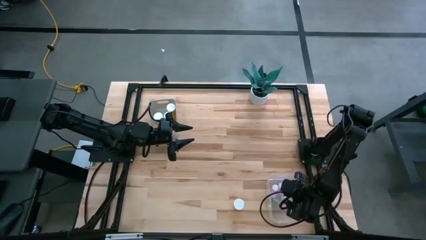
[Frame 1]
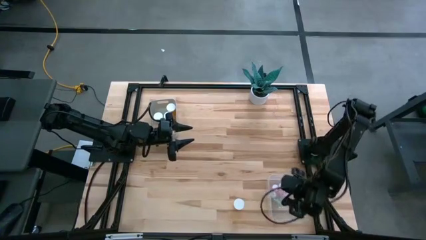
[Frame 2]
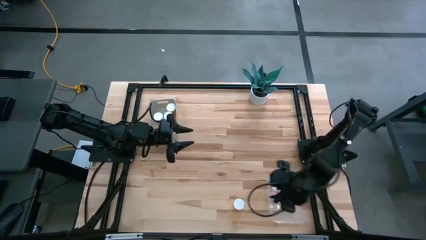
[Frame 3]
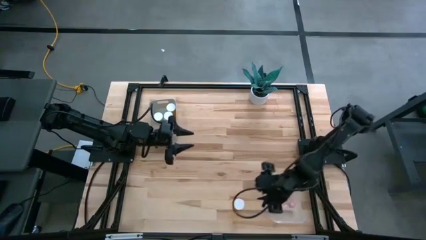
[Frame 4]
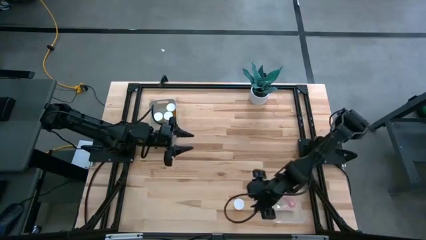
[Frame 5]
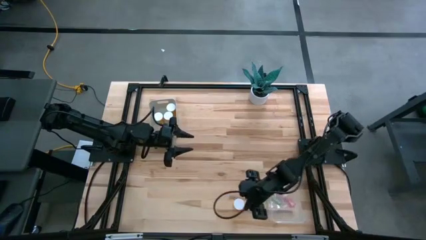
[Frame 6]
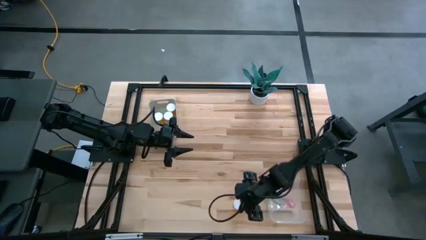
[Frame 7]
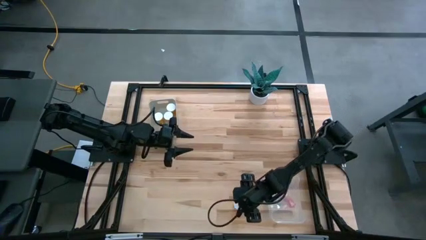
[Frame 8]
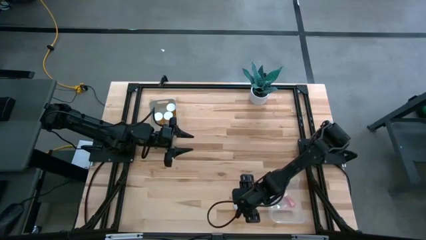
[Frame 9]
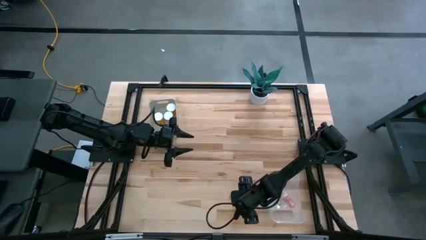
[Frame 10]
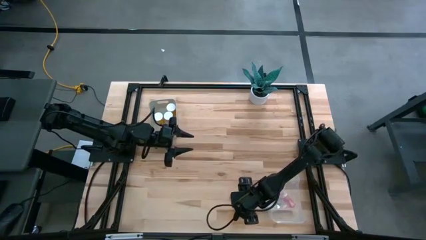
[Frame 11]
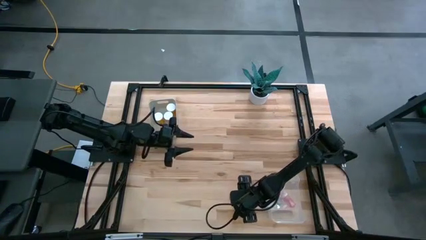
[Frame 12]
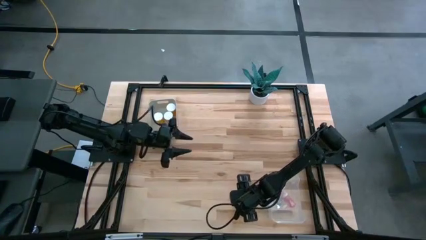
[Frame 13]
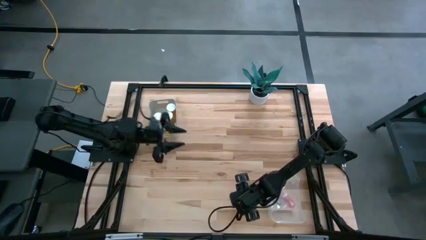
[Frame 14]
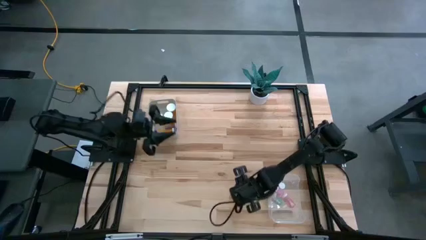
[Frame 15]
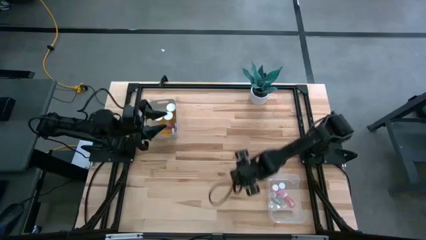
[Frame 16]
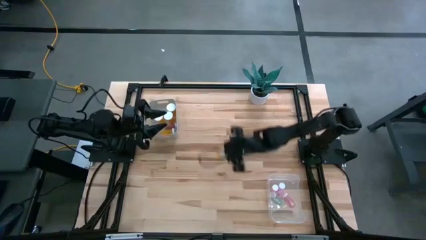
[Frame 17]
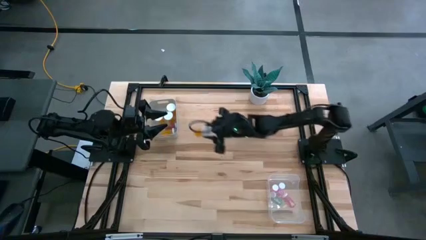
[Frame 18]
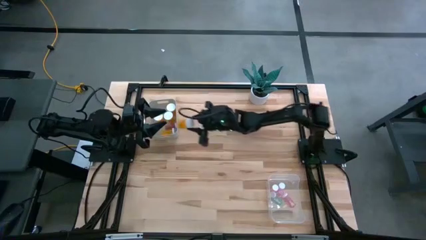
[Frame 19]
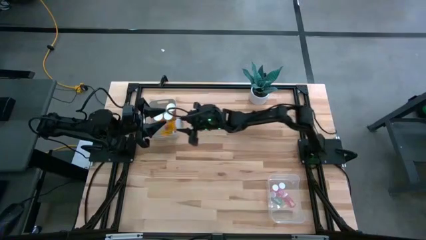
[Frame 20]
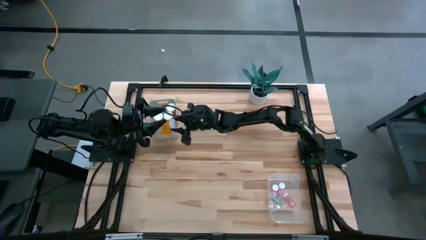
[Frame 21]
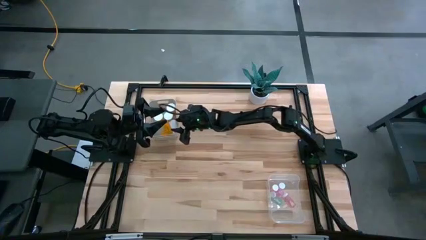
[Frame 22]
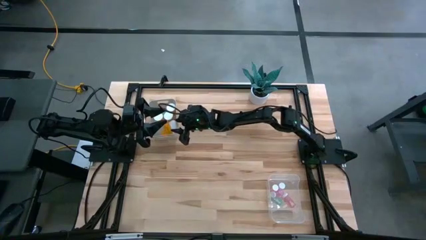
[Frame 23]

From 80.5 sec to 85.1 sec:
Task: Pick and place medicine bottles into bin by pill shape (circle, oval)
Put the orange capsule bottle into the gray bin

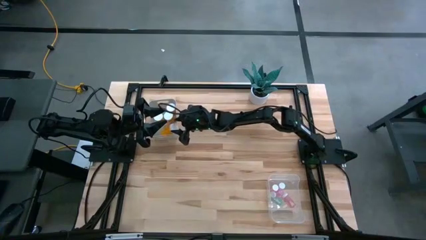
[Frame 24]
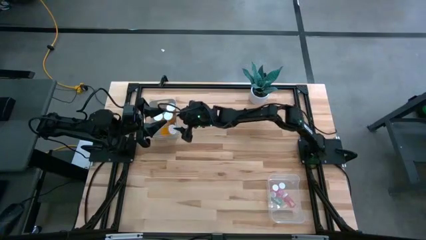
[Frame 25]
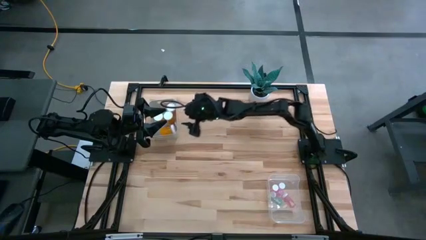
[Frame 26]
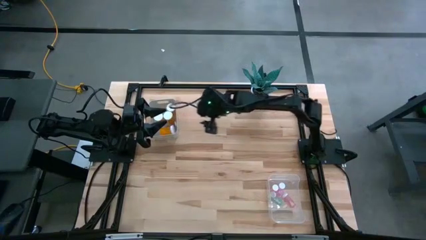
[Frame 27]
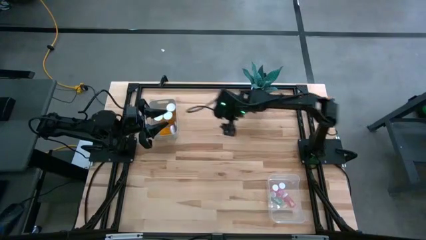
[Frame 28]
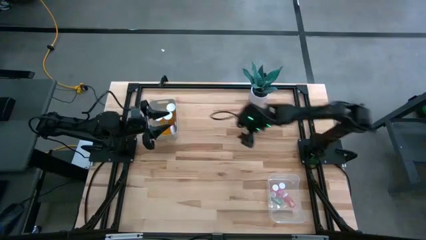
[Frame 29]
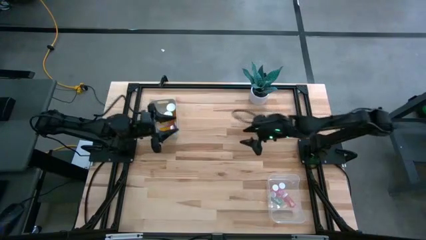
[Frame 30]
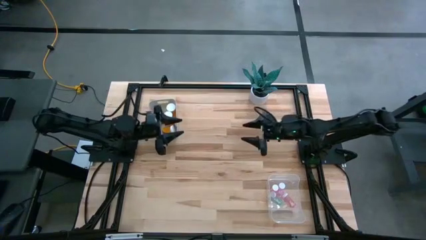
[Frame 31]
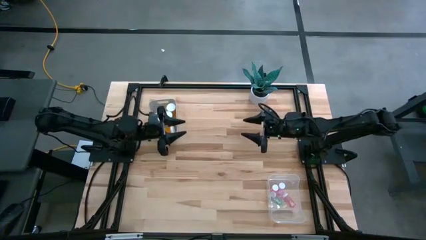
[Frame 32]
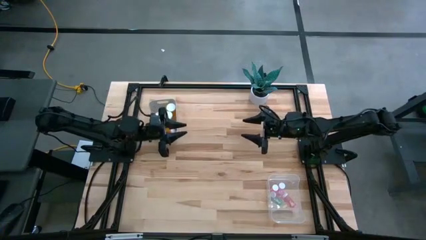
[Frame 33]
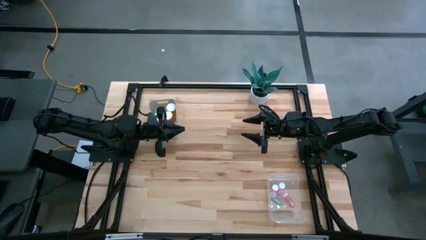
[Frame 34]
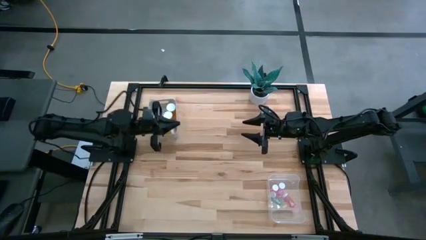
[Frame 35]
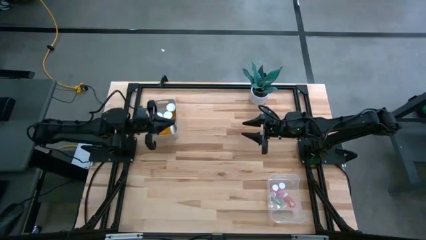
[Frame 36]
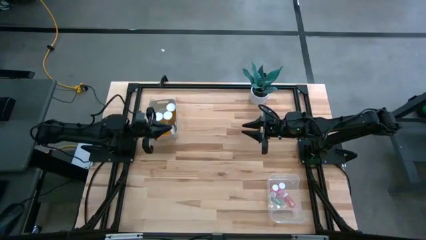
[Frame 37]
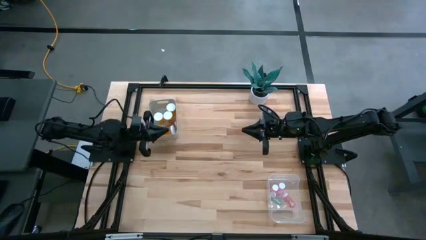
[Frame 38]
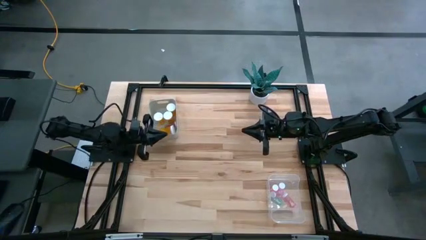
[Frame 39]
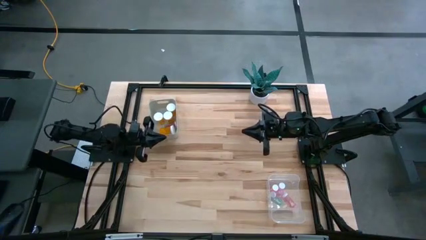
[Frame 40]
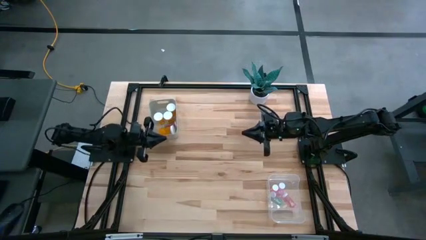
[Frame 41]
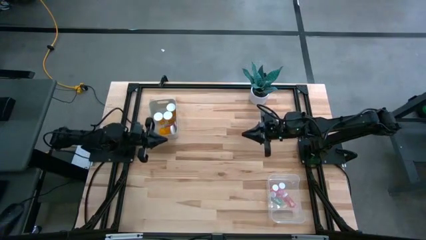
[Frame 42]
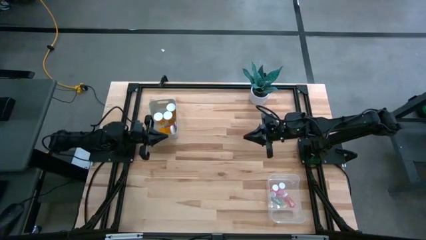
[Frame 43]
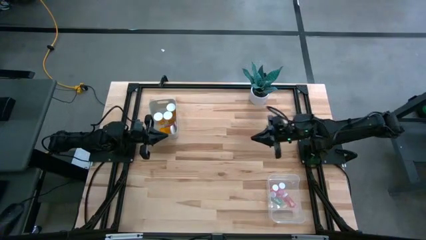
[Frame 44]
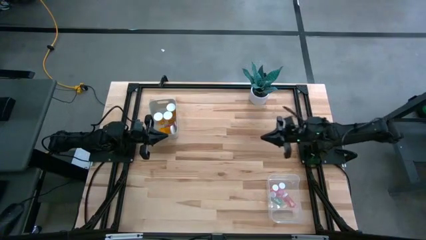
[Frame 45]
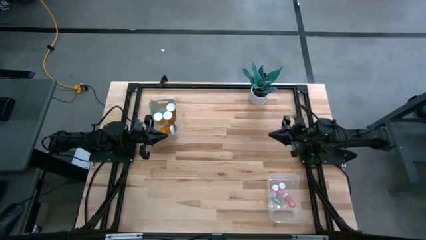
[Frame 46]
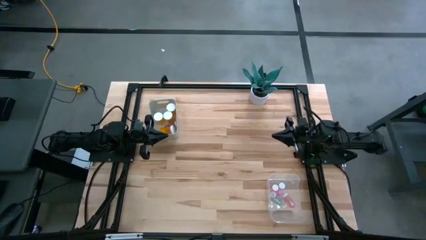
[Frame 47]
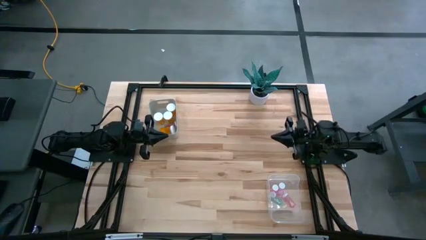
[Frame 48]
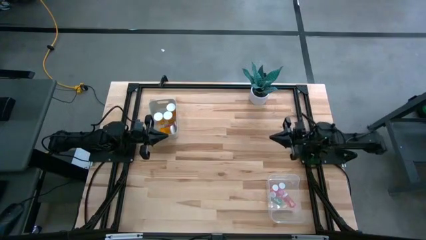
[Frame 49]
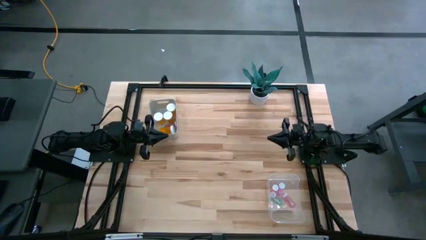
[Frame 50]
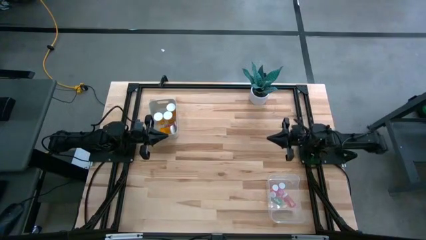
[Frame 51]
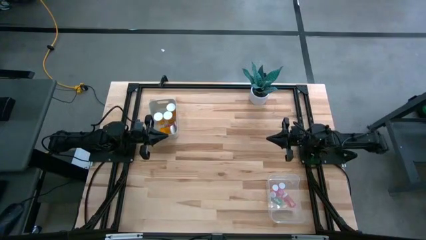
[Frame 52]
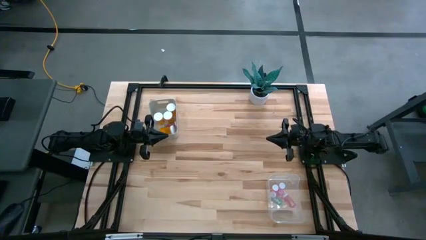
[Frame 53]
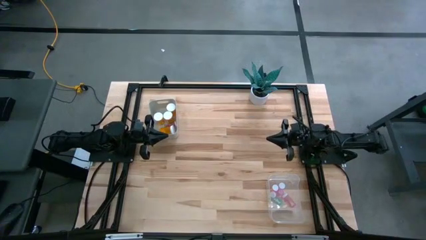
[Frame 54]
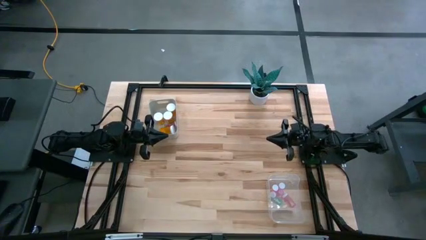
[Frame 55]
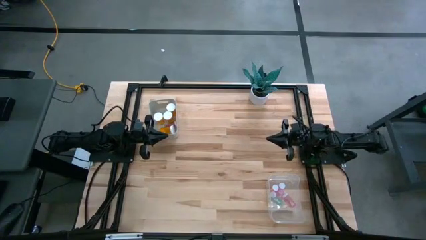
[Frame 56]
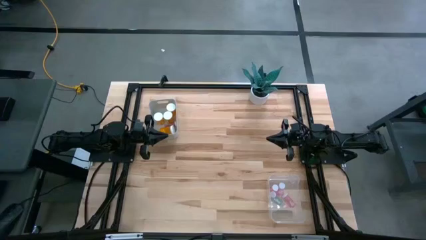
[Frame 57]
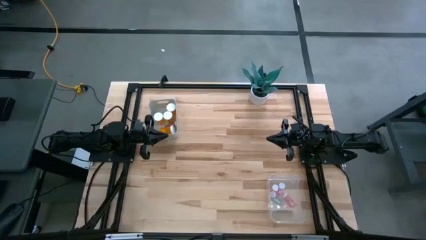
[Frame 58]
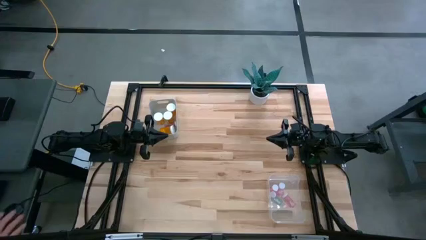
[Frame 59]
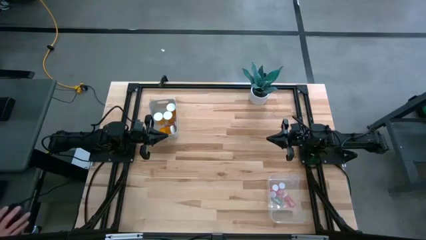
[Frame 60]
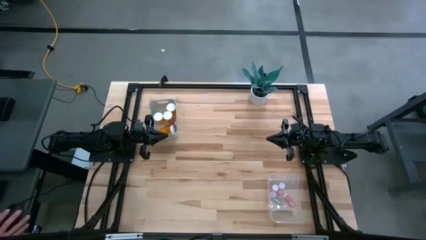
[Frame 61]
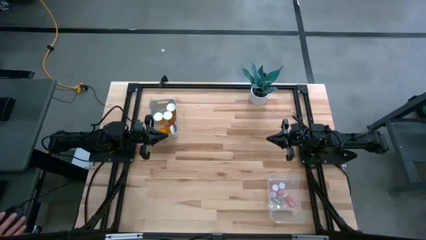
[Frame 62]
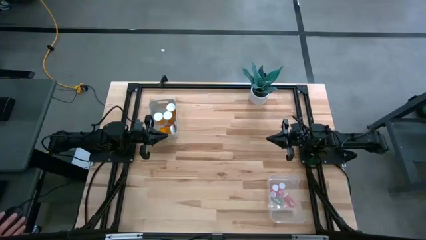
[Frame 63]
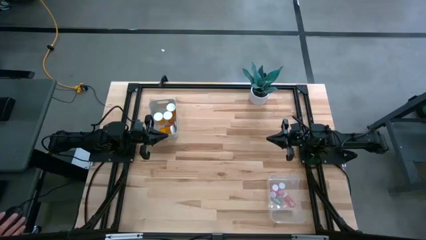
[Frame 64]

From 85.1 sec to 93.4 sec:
Return to Home Position

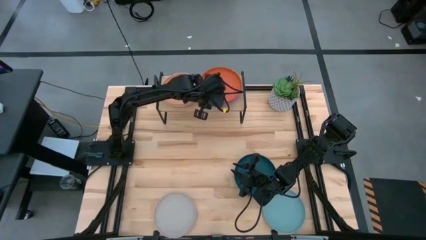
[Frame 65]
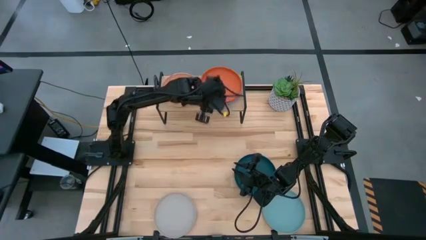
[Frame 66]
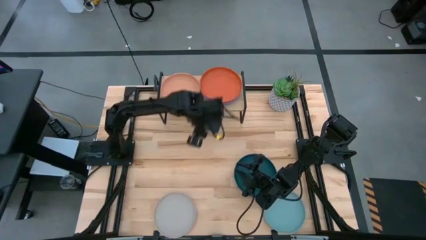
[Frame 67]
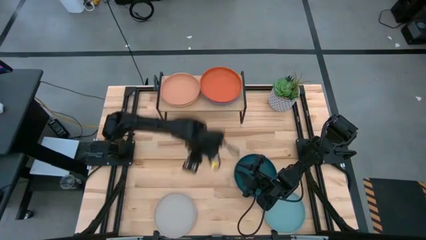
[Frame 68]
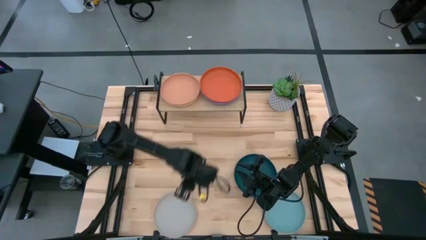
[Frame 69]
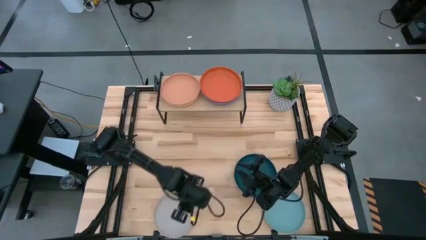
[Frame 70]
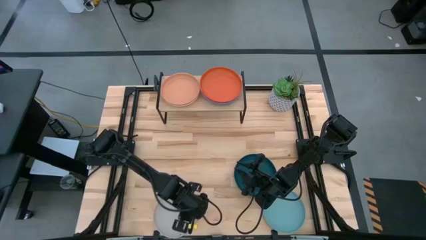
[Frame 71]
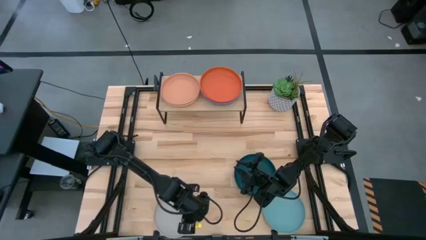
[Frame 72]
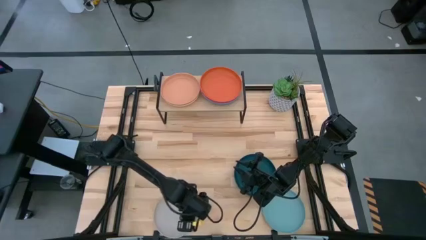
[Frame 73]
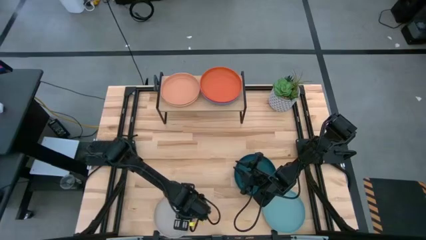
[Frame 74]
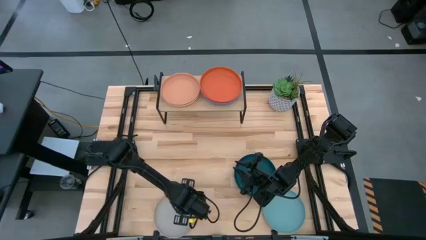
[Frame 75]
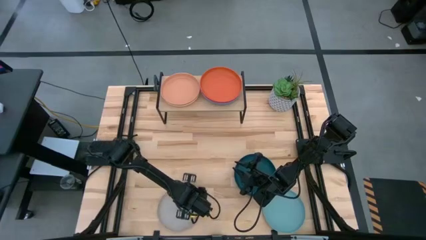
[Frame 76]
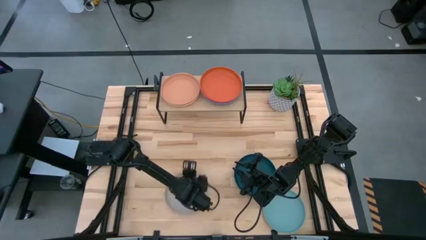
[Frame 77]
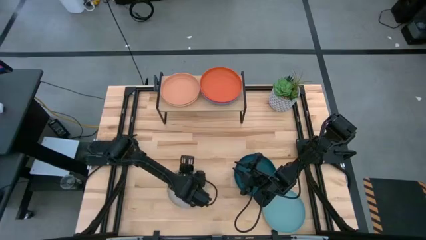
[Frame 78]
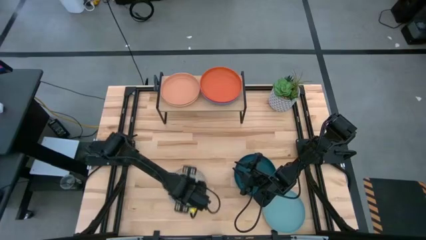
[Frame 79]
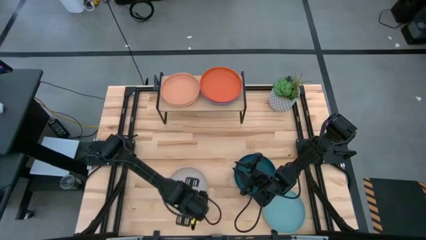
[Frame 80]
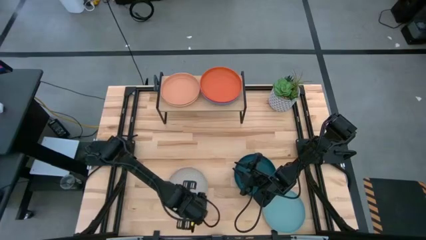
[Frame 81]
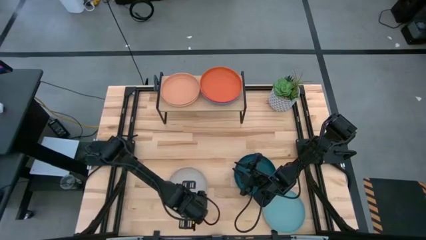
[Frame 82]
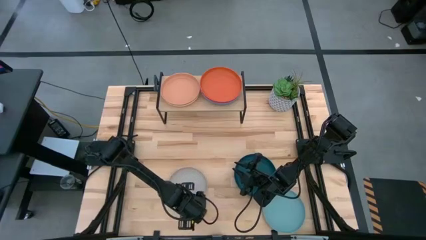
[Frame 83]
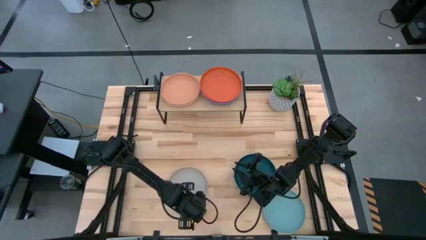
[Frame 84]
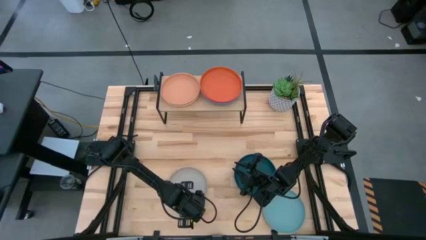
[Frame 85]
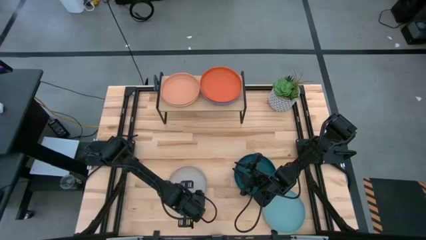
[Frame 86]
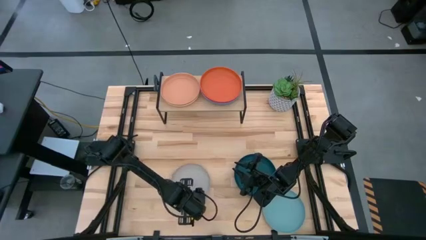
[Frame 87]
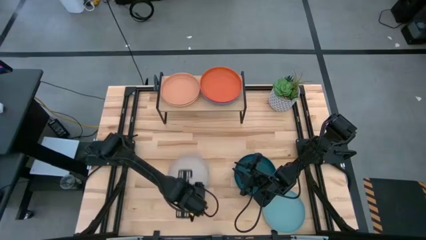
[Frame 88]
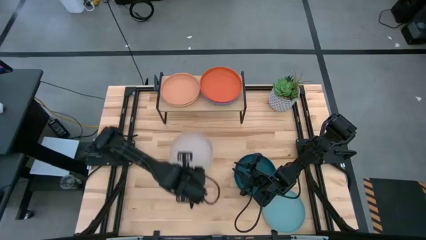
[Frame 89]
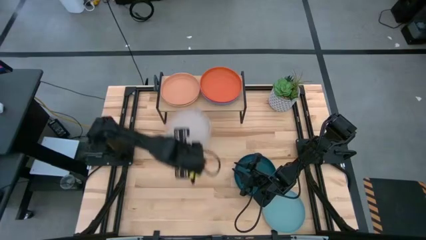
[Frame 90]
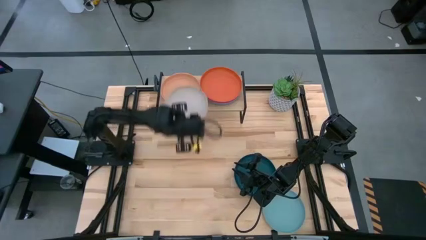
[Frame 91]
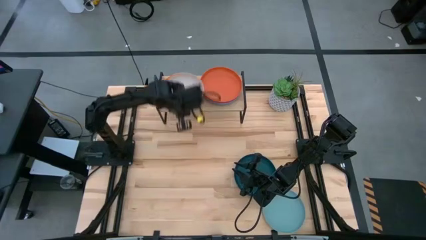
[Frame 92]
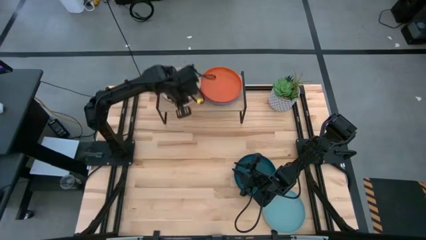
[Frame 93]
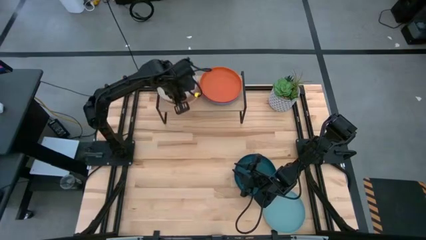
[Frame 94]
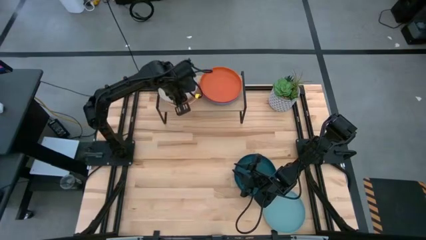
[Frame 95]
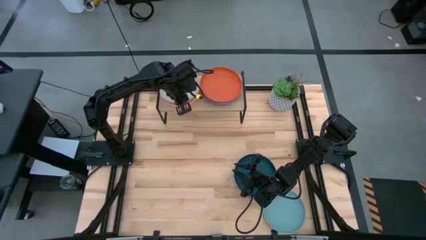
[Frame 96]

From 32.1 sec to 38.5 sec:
Task: Place and stack plates onto a shelf
Stack the gray plate on top of the brown plate on the shelf
